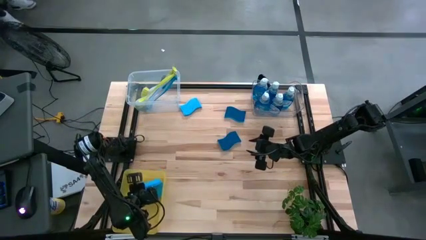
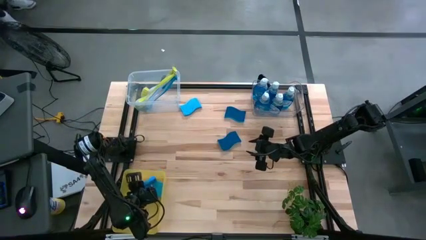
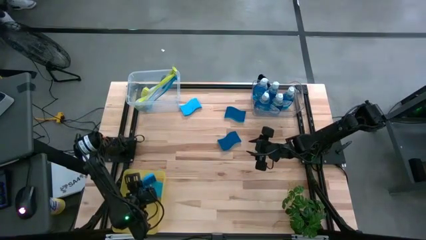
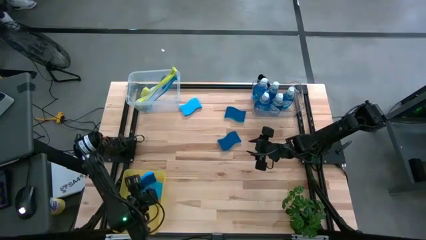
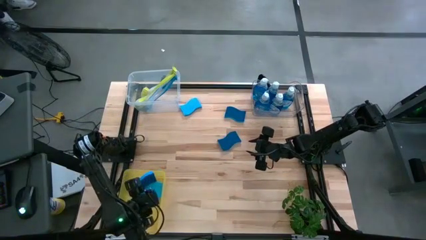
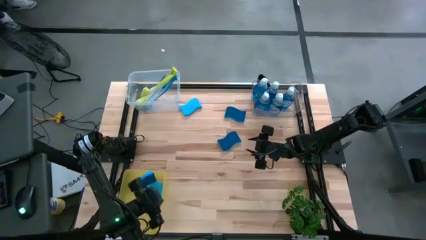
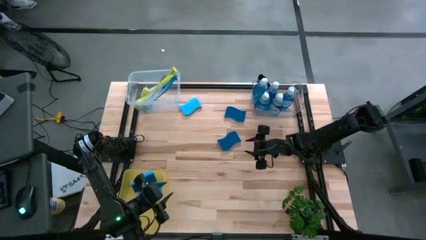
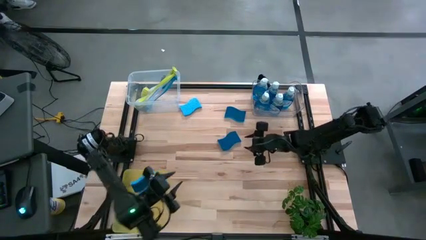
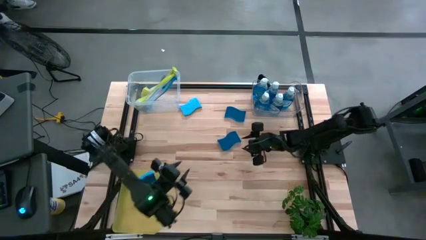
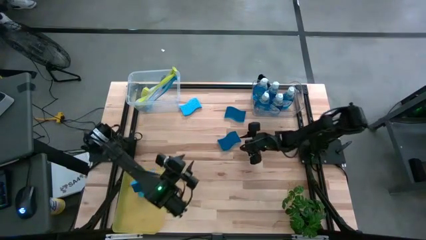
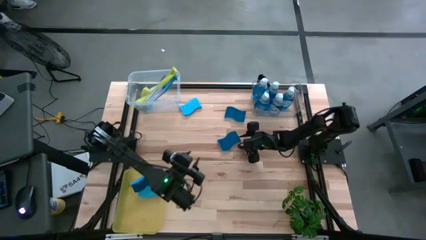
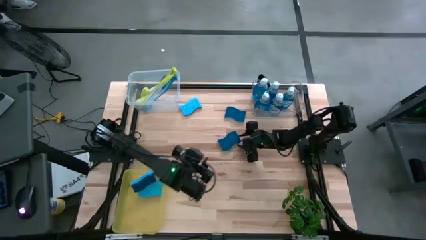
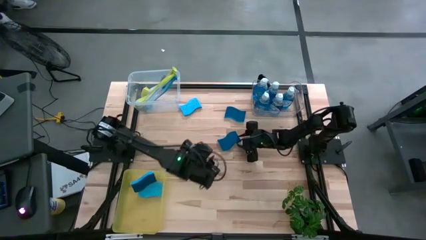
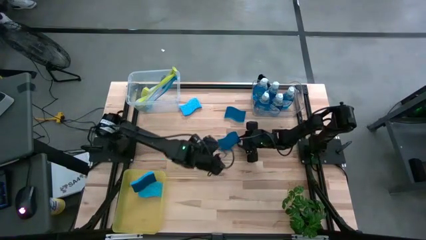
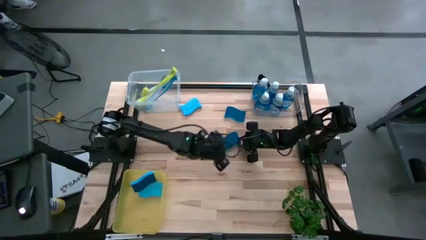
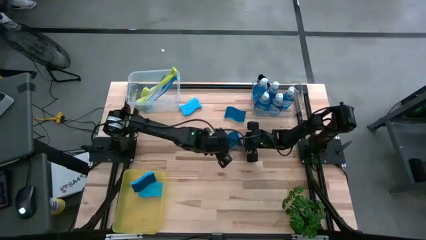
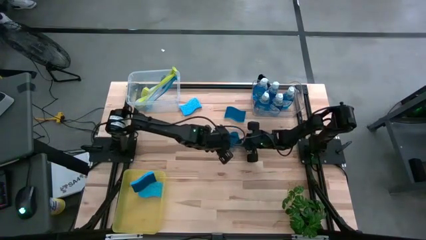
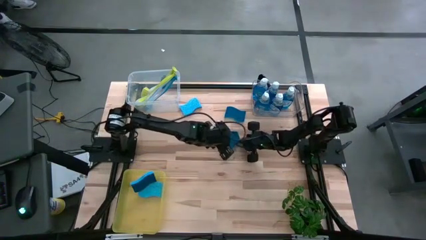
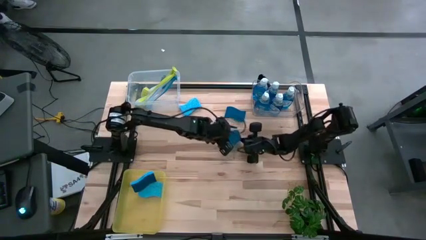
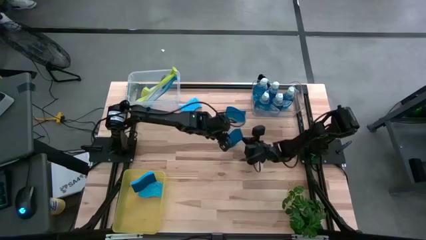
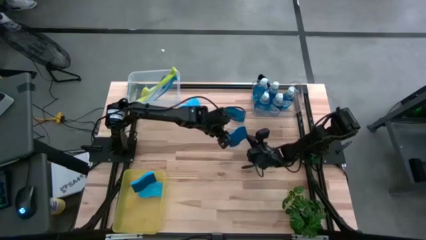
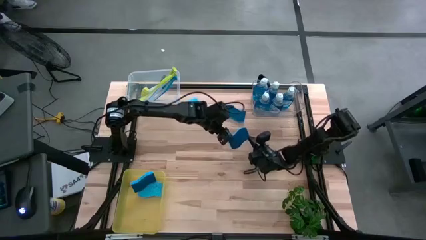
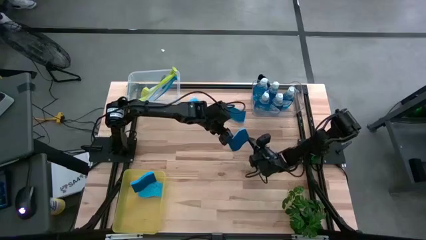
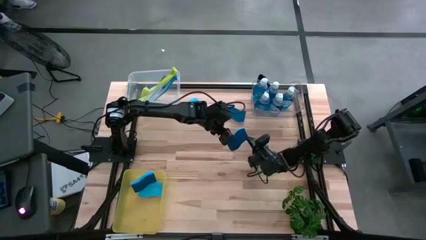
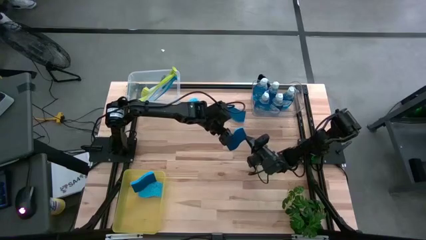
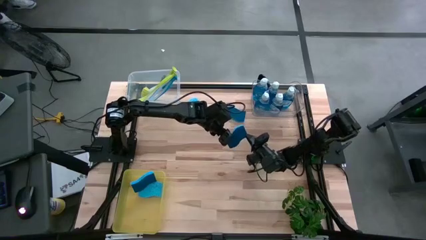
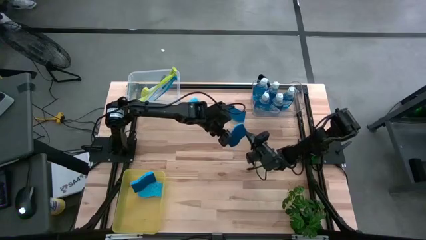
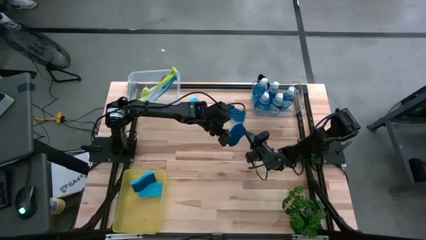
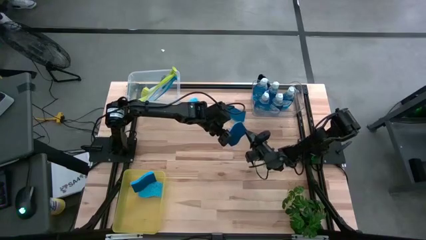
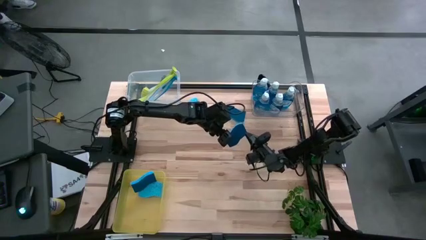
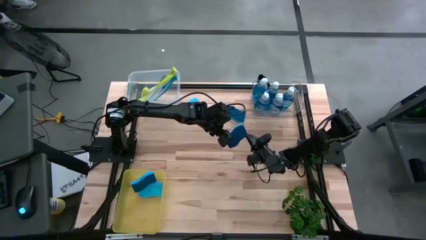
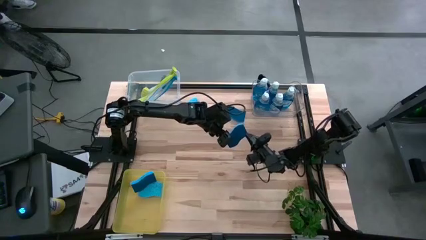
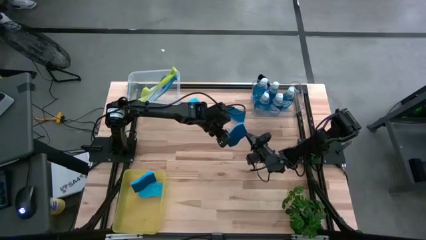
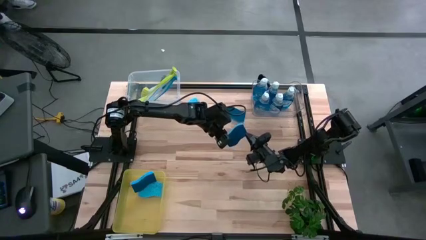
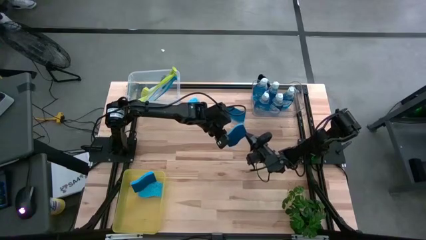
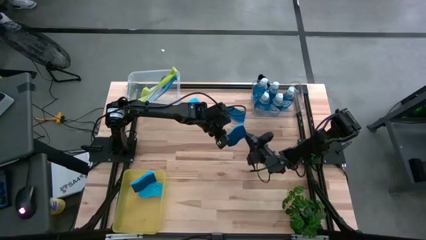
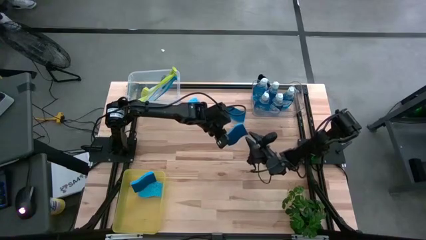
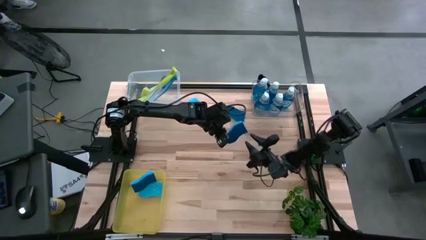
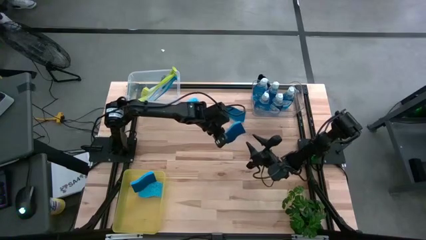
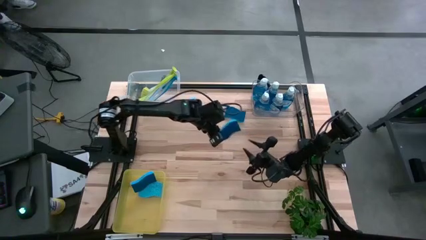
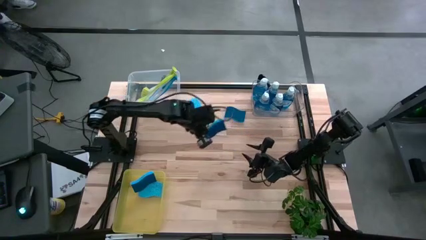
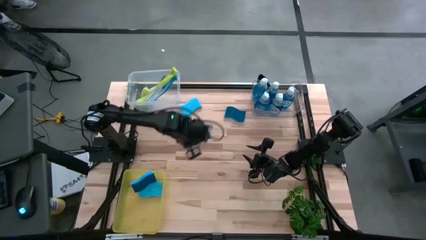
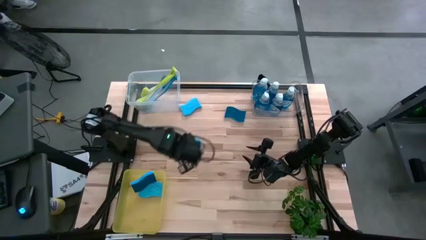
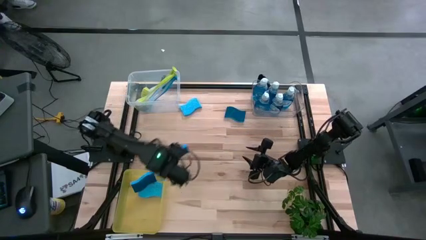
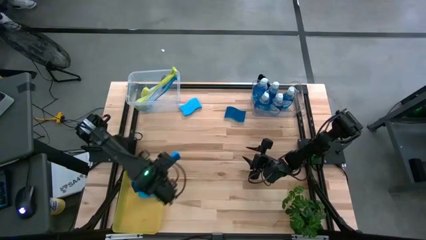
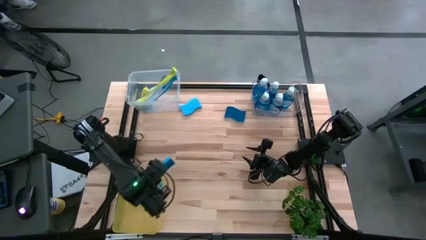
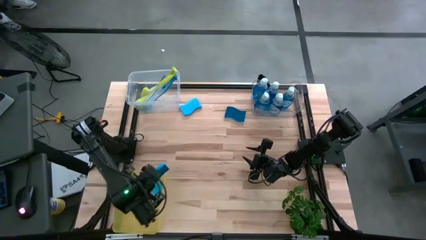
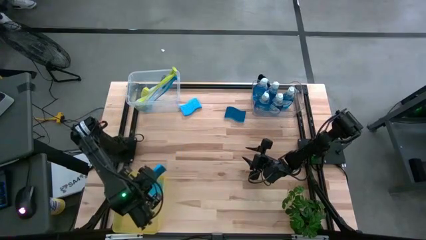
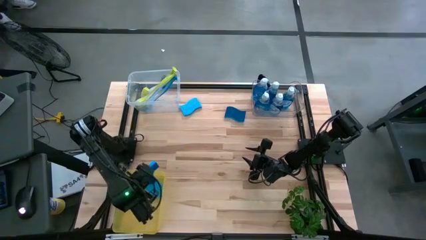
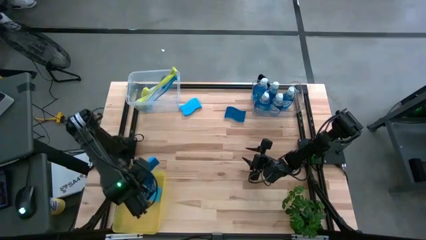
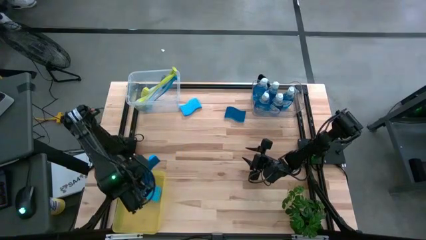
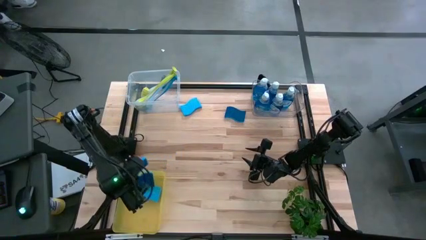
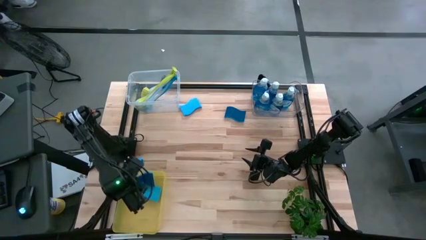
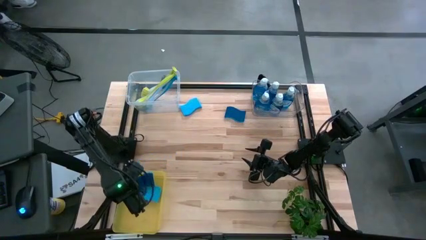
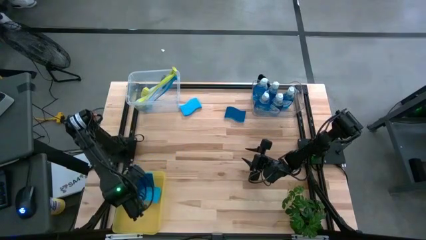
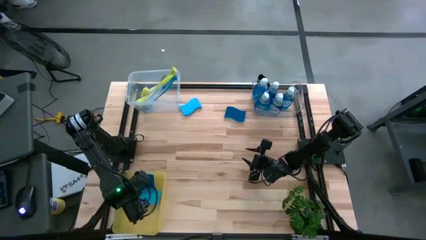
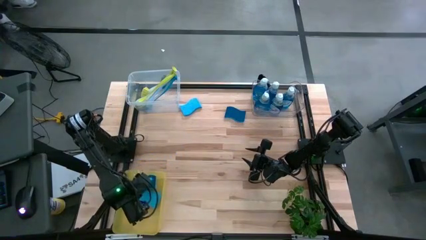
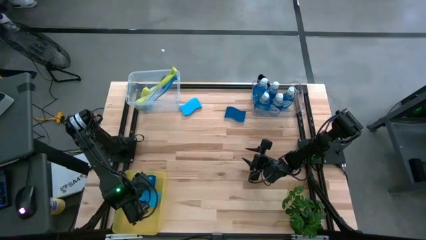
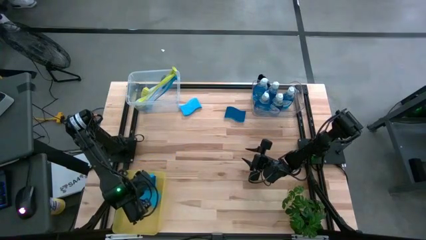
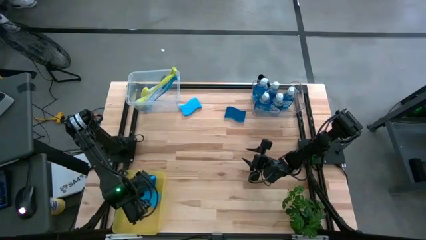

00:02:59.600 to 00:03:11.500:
Task: Pick & Place Kitchen Sink Supplies
Put the bottom sponge into the yellow bin

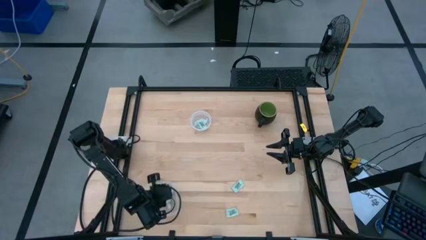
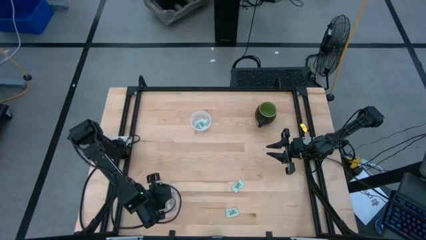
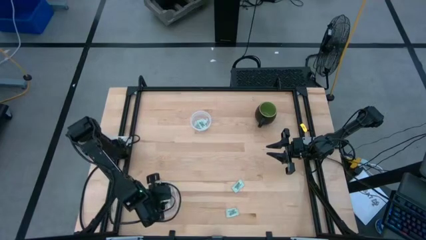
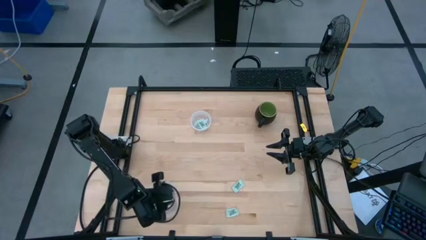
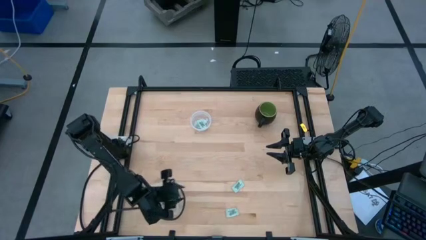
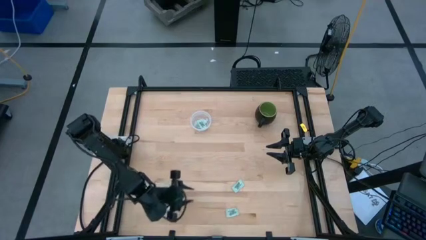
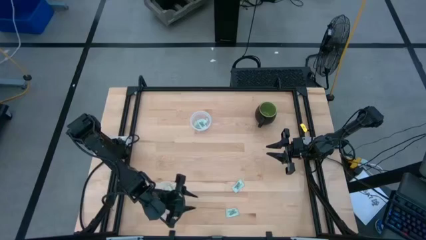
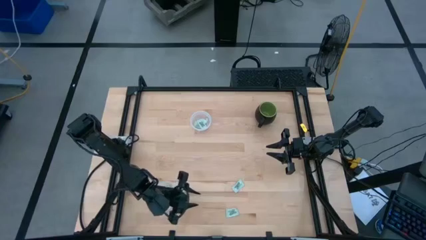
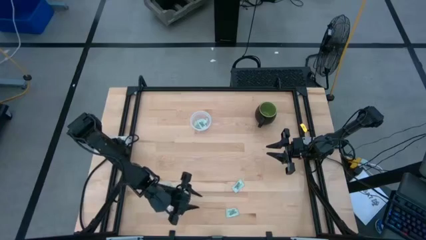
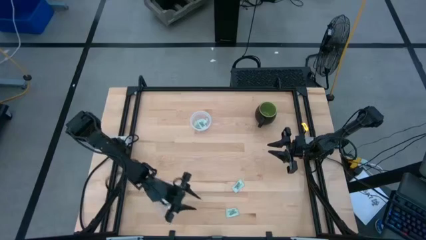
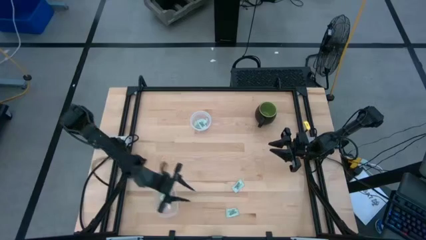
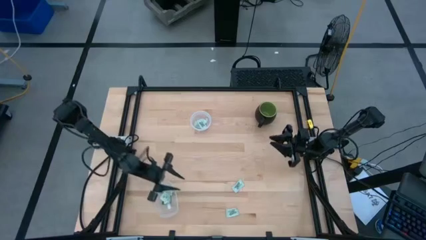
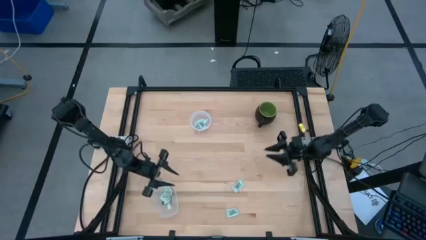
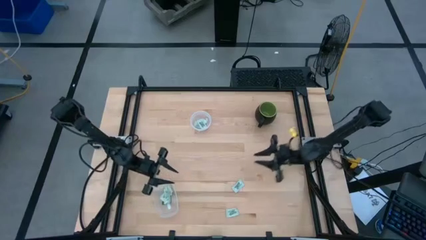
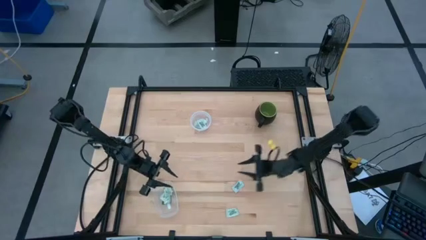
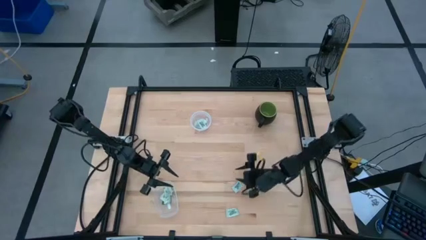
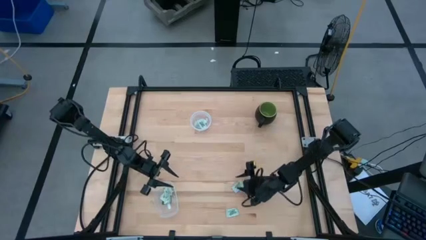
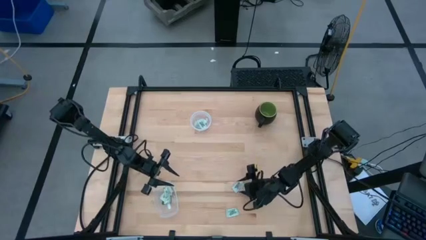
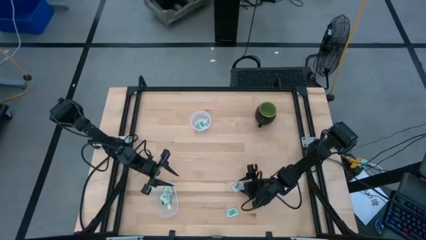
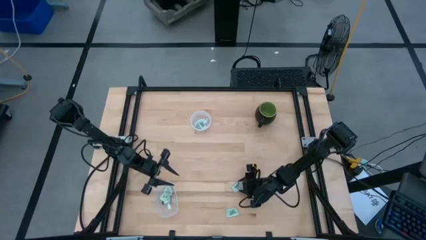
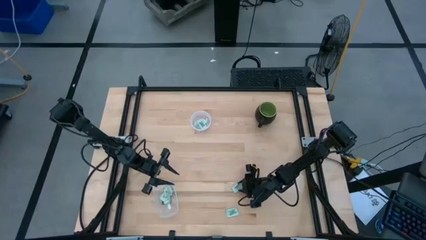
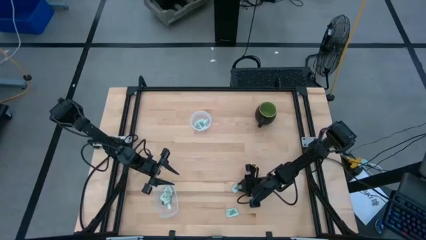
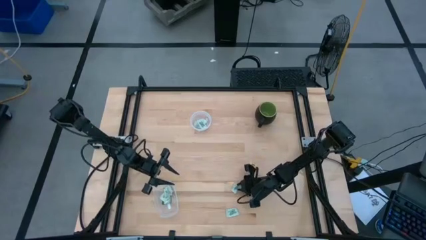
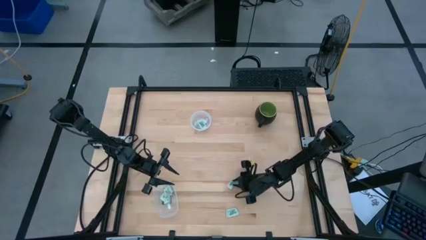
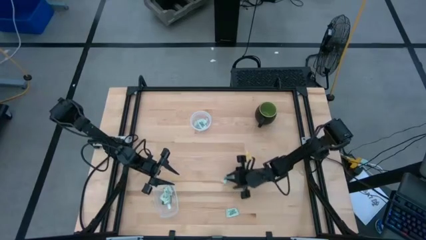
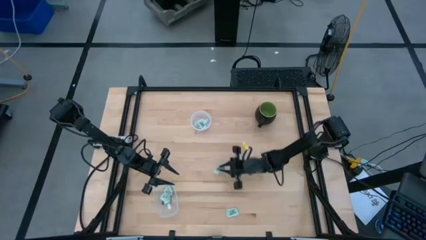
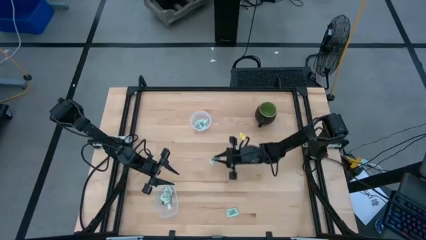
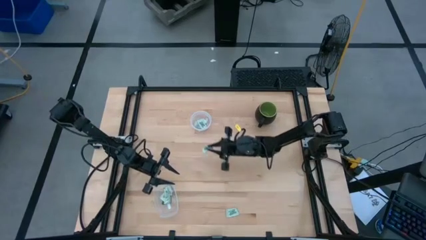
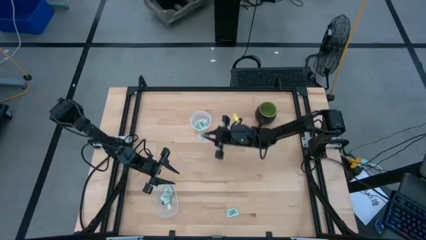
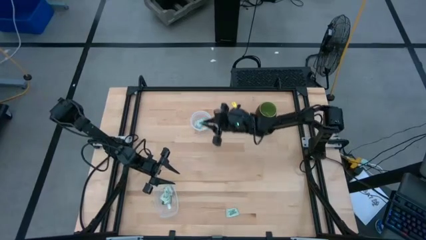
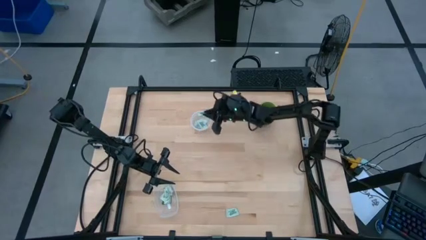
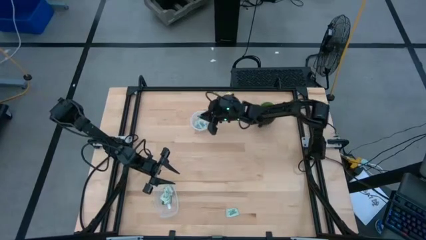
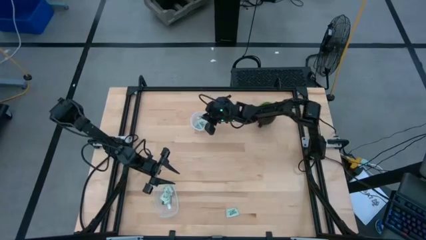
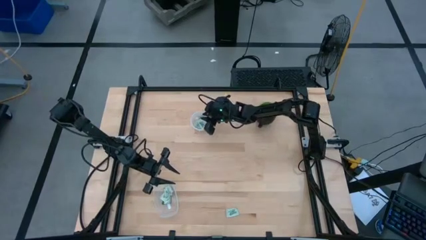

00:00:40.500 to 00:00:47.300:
Task: Pick and place Stevia / Truvia into bins
Put the stevia packet into the transparent circle container
